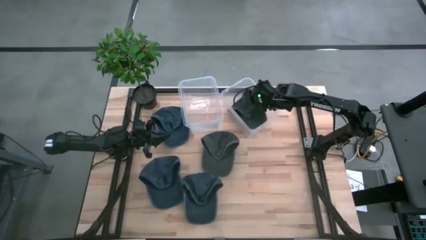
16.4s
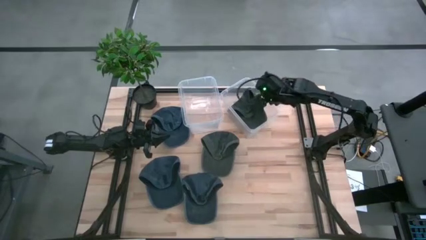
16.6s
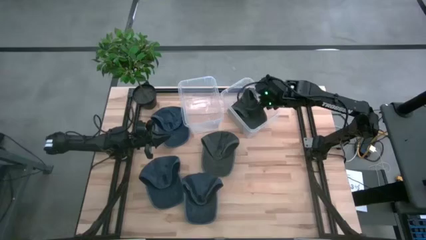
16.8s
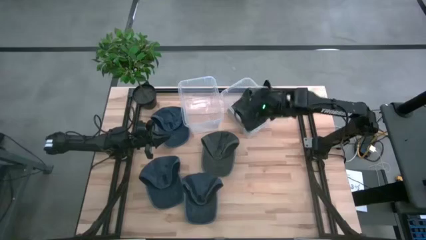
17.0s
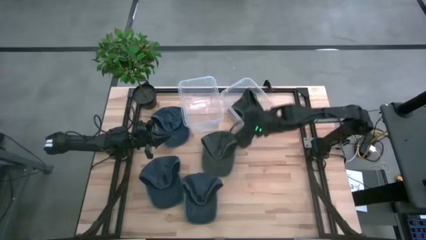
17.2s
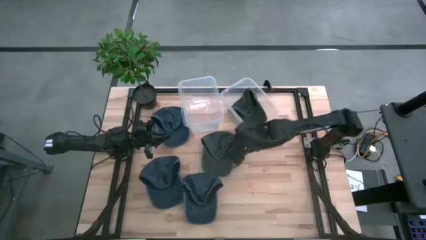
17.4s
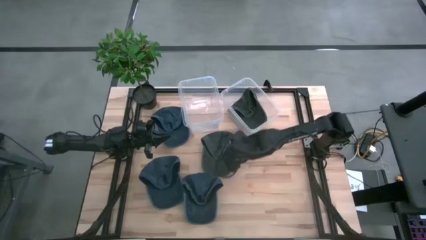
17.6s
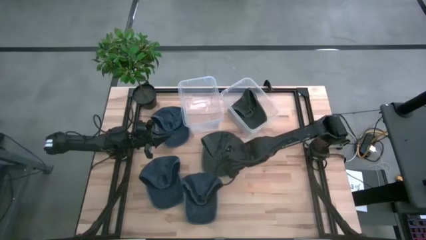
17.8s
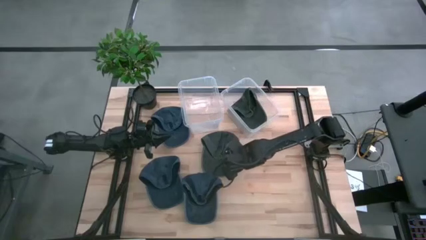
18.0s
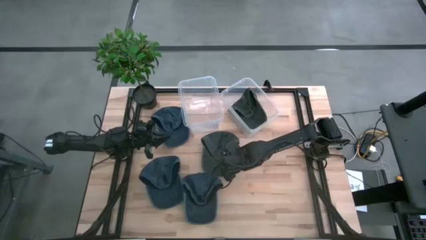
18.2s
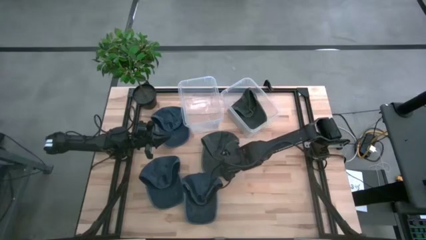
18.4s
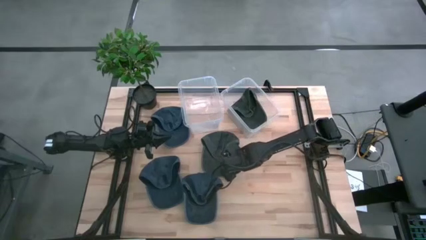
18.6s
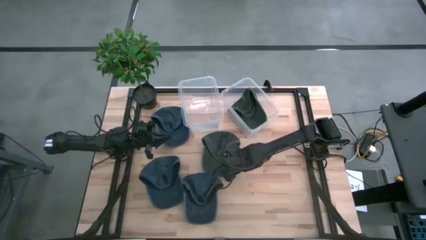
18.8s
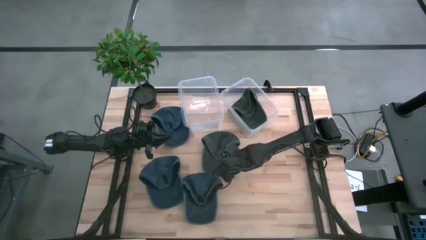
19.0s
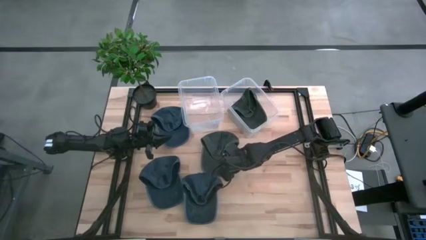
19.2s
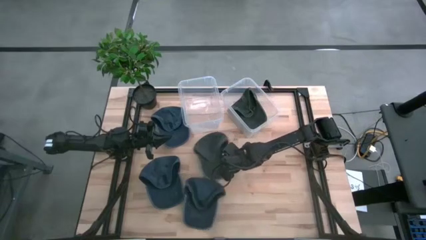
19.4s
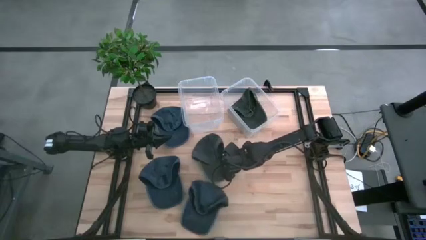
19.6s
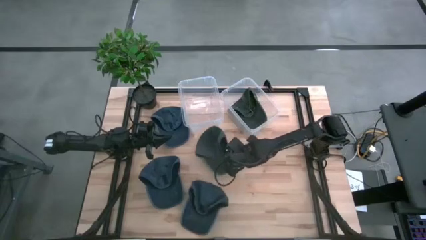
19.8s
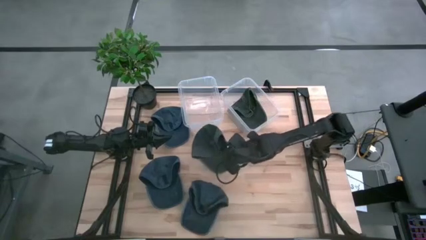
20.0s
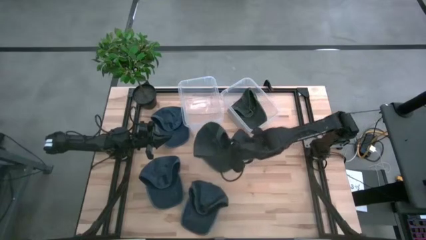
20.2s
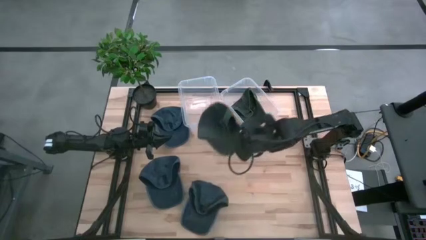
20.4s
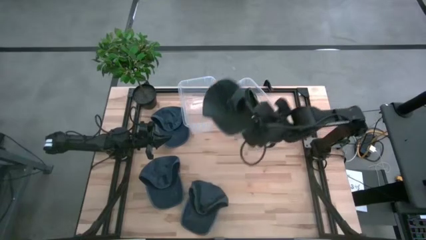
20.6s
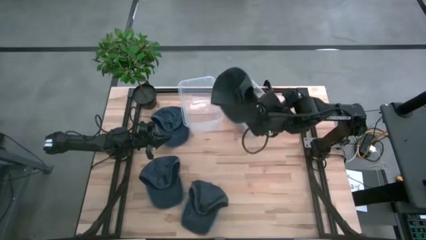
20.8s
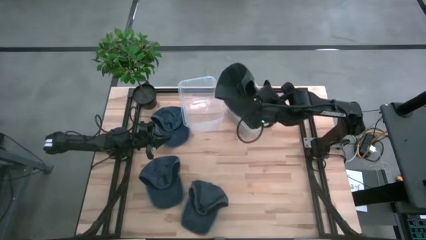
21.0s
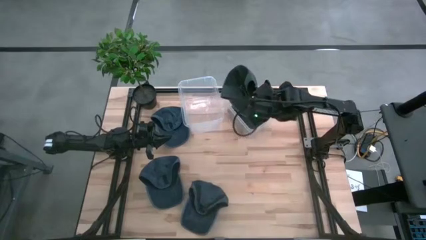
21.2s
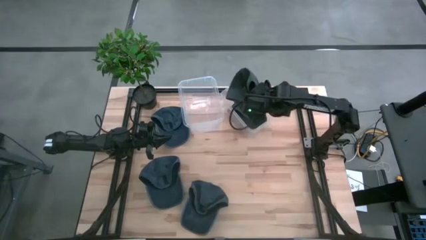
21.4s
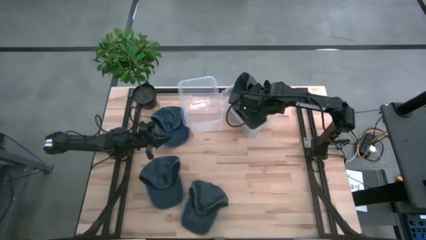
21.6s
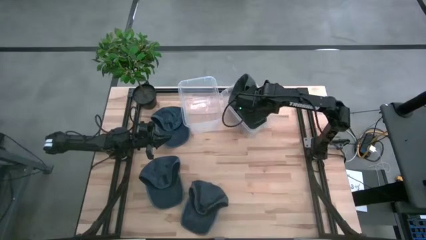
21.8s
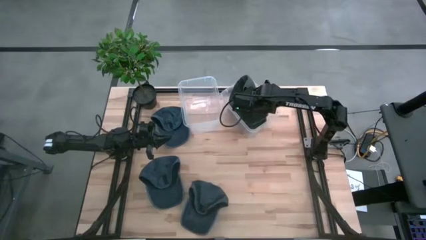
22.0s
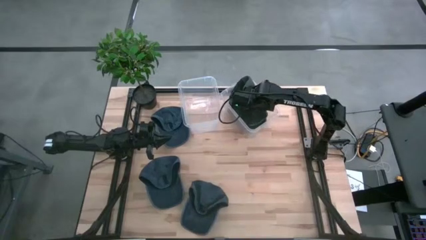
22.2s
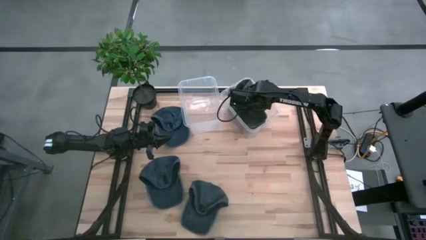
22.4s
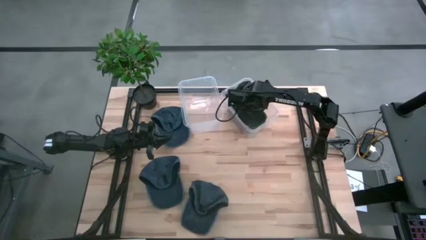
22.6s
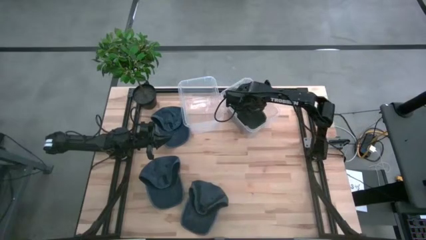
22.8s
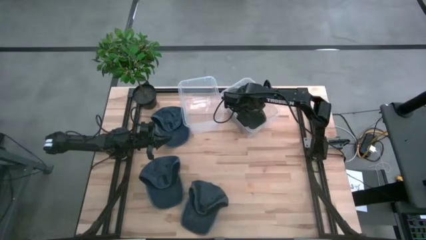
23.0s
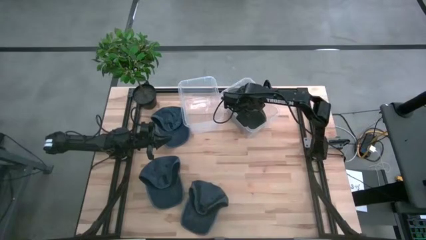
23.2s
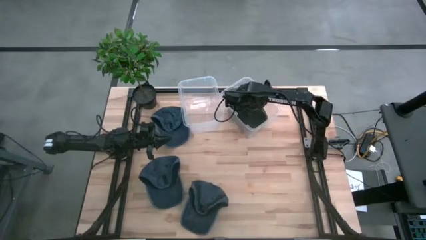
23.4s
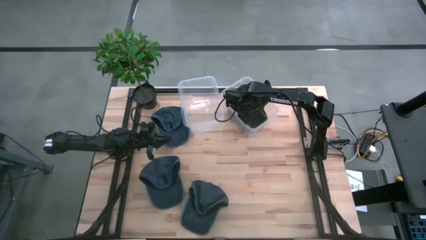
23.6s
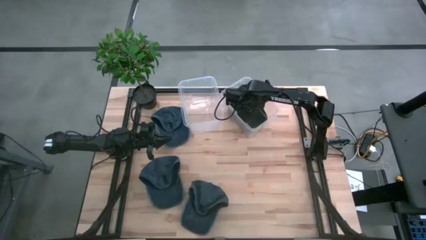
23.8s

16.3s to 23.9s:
Task: Pick & Place hat
Put the green cap into the right transparent bin

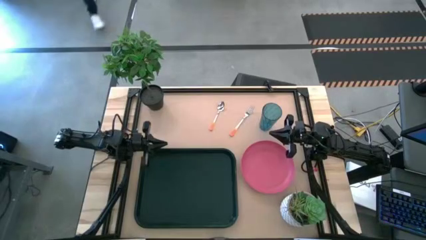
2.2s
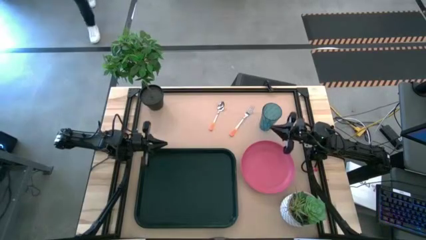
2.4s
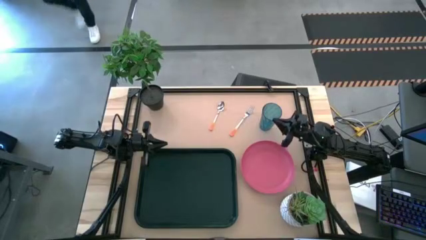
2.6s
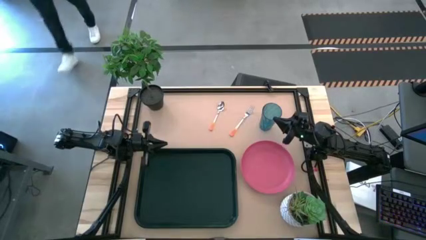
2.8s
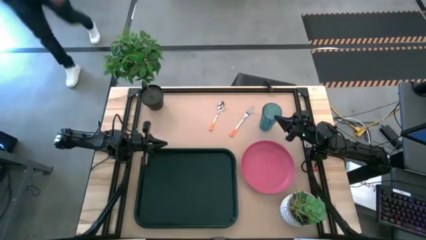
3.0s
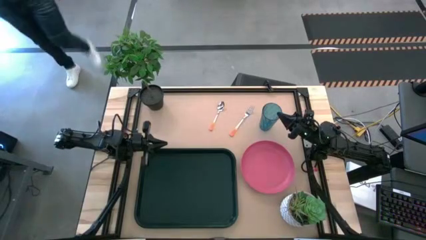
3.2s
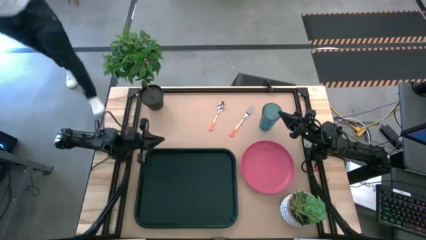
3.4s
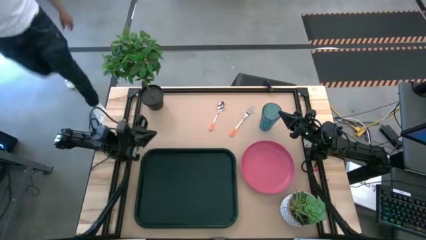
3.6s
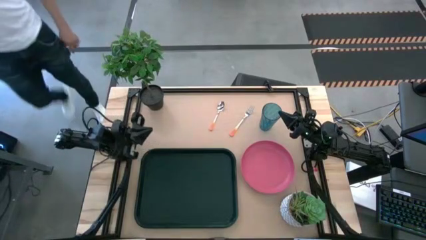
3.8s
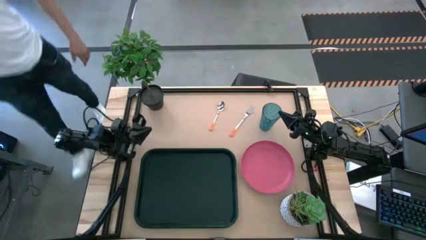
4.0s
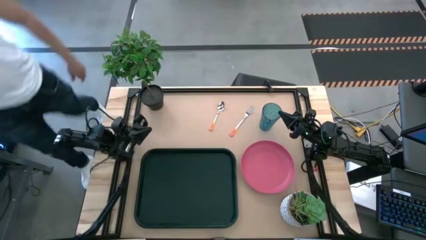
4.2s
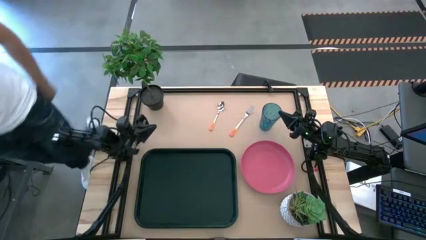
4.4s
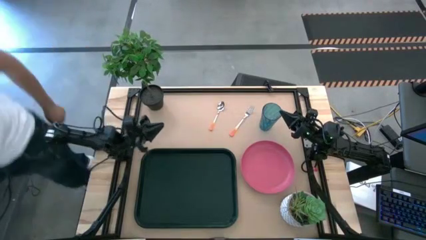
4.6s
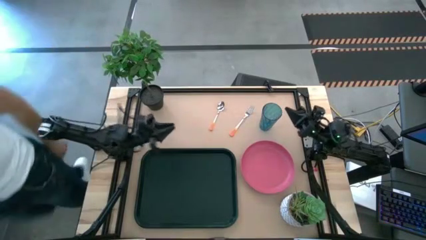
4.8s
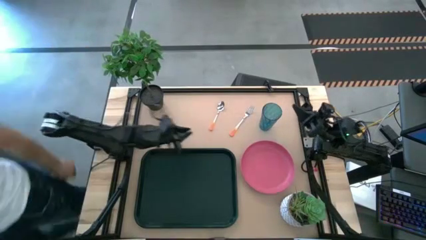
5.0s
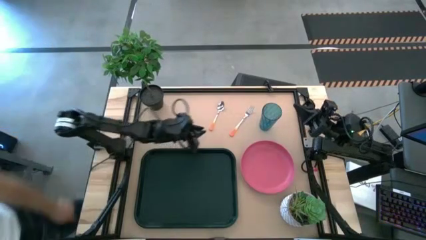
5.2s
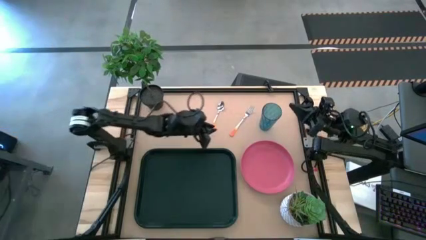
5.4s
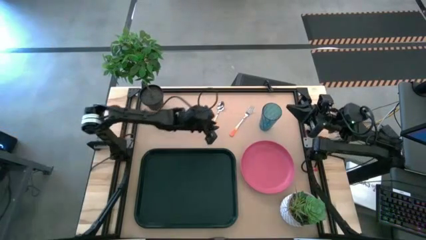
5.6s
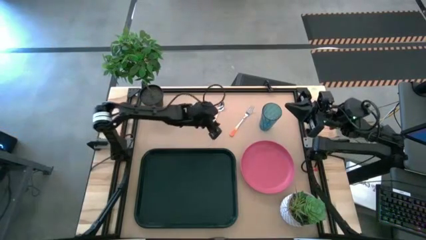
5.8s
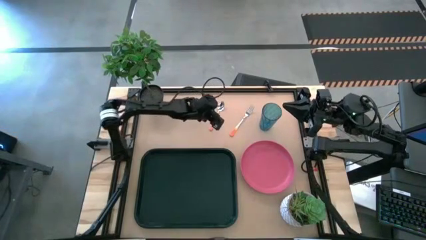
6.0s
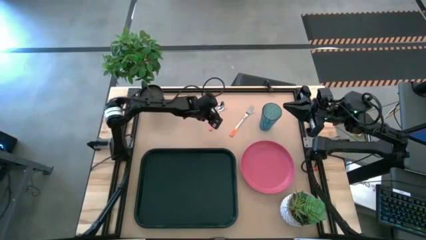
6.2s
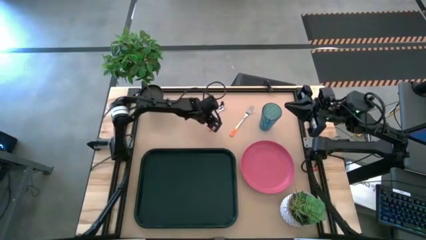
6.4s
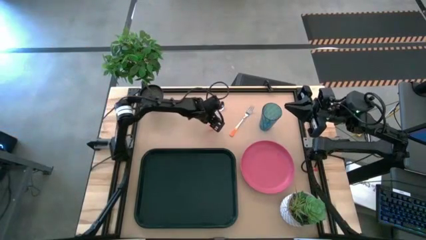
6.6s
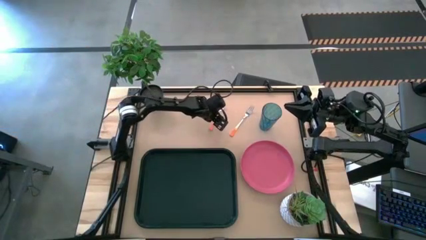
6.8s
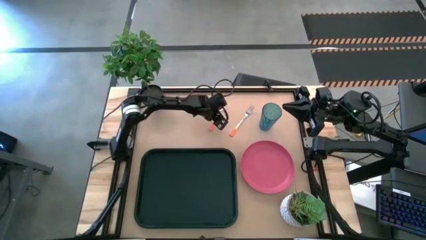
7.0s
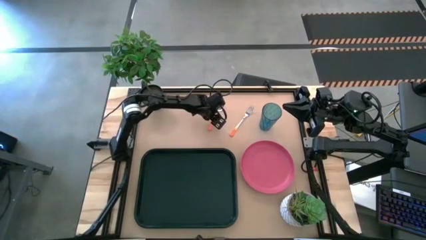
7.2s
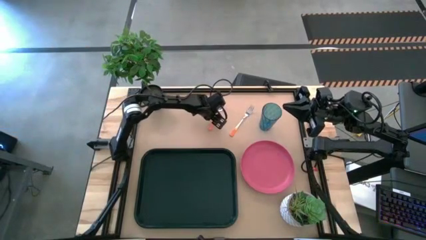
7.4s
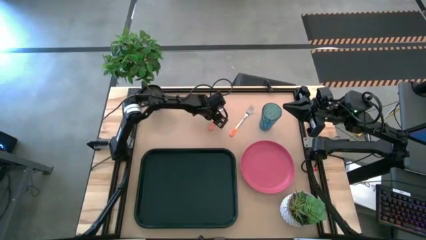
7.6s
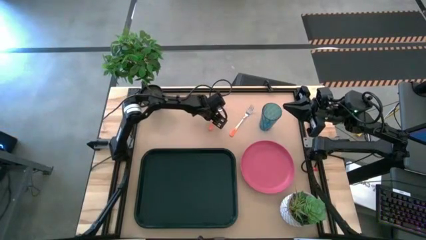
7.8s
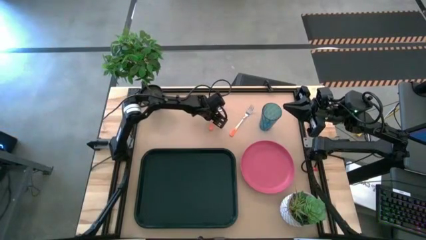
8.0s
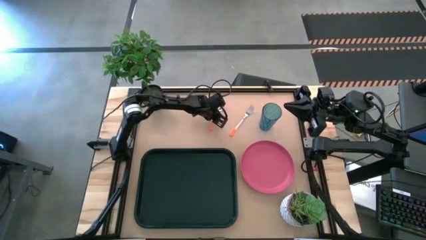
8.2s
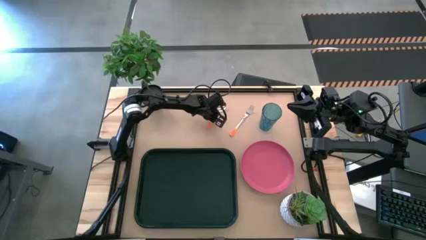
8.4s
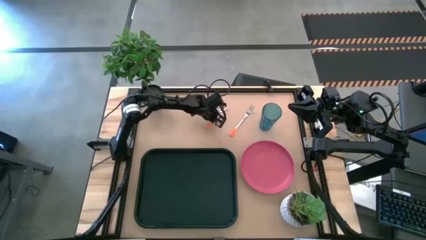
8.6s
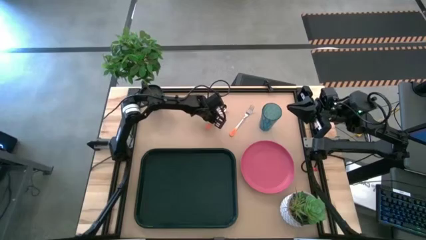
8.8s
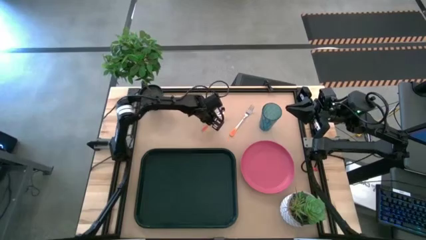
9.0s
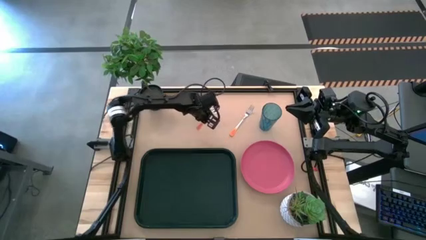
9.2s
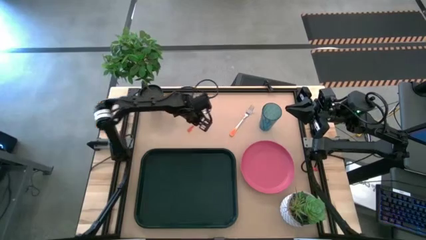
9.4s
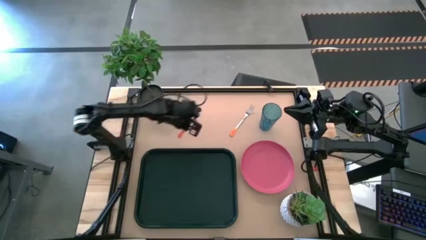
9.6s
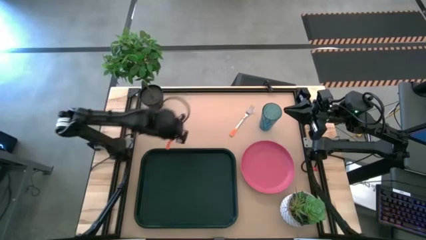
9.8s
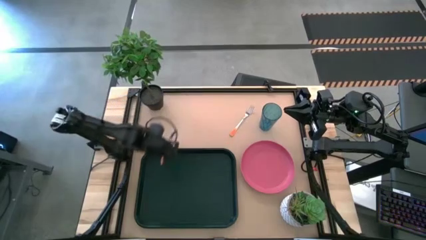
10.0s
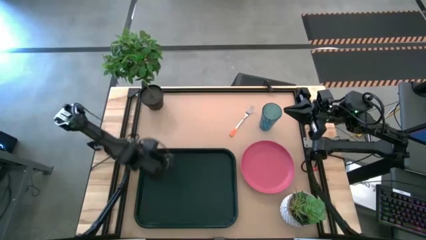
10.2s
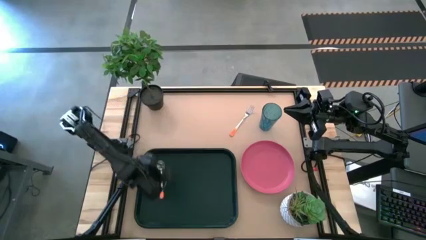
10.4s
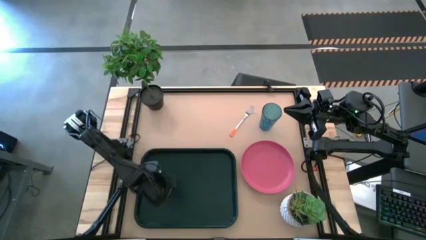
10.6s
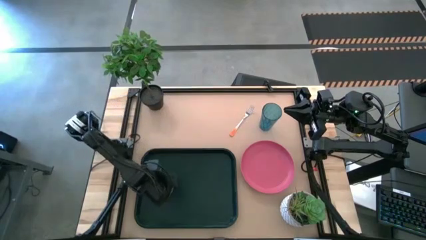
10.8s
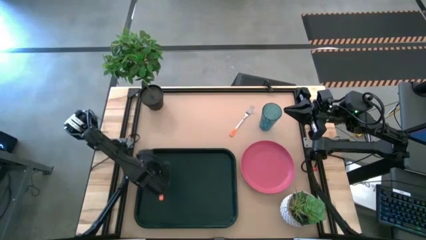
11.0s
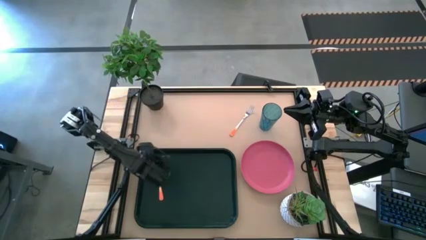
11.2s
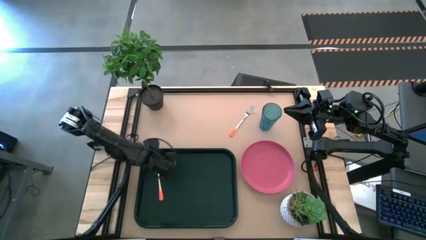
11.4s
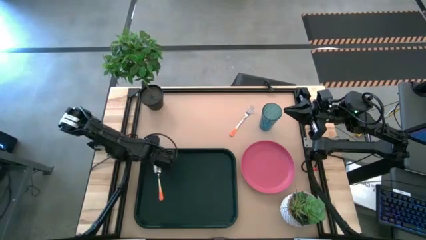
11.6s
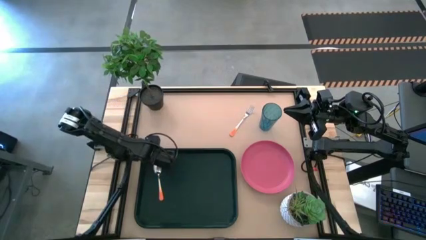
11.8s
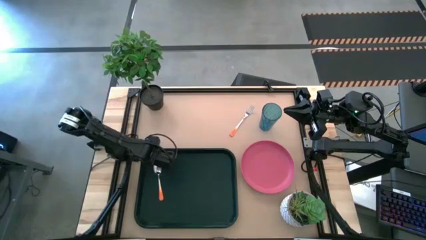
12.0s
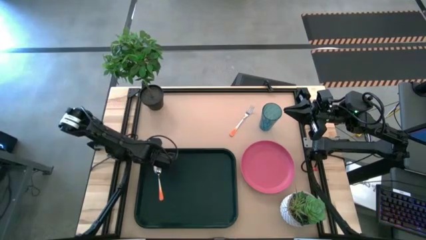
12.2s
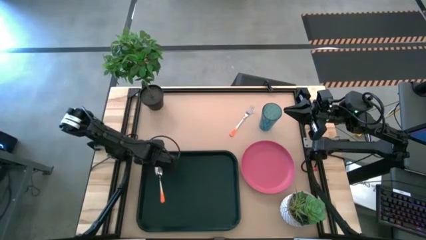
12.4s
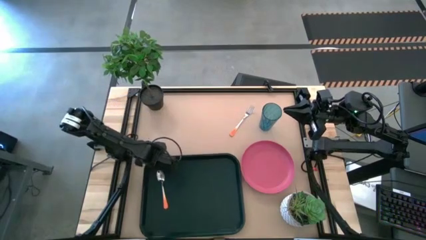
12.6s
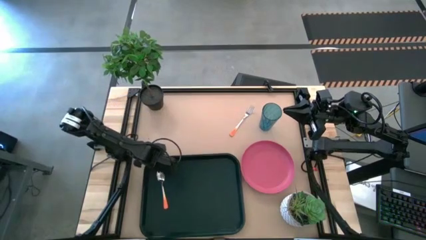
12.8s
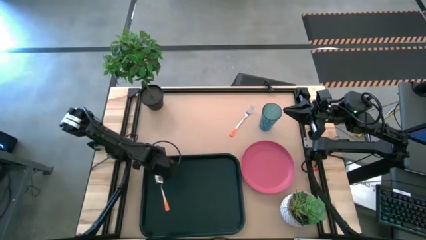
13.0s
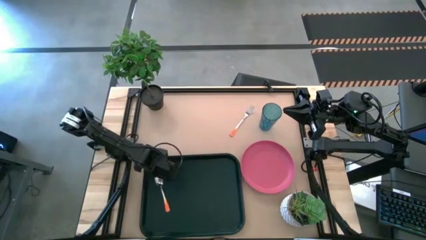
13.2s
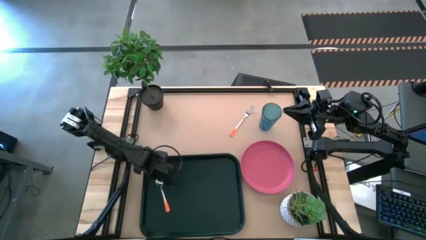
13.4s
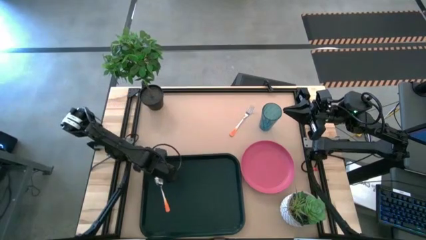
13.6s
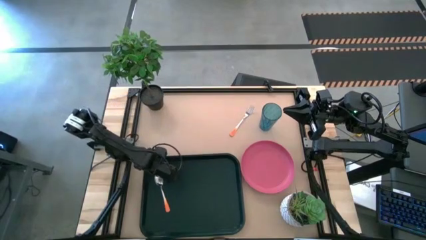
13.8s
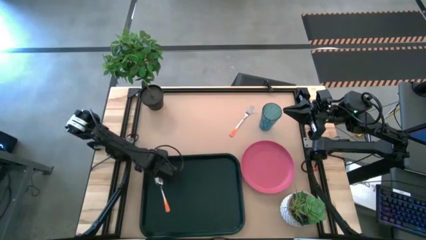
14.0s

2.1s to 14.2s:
Task: Pick and place plate/cup/fork/spoon on tray
Put the orange spoon on the black tray
